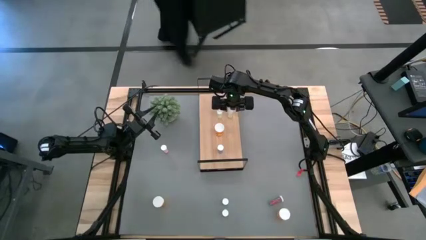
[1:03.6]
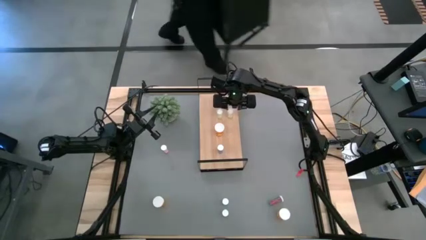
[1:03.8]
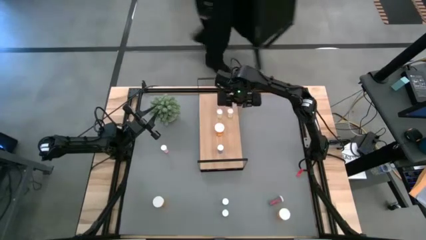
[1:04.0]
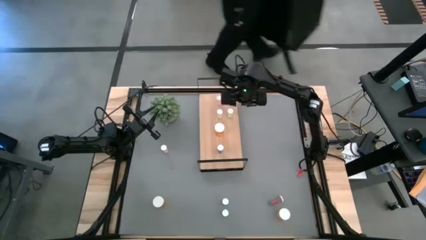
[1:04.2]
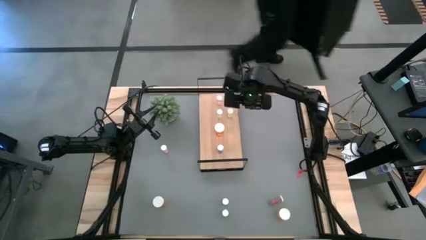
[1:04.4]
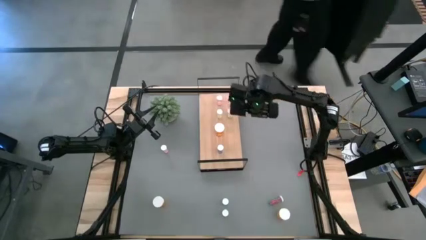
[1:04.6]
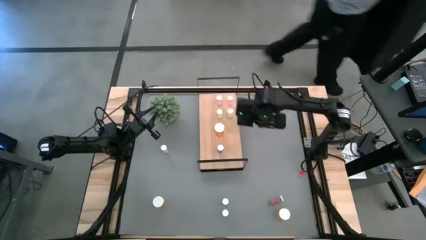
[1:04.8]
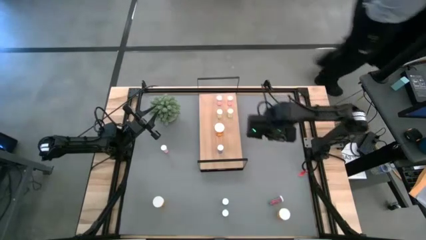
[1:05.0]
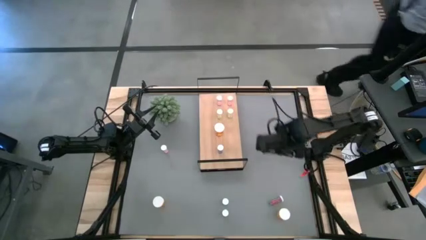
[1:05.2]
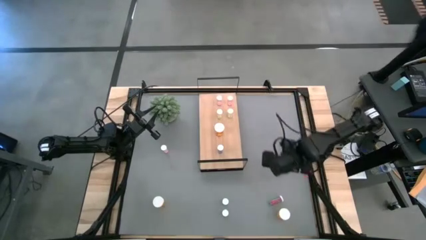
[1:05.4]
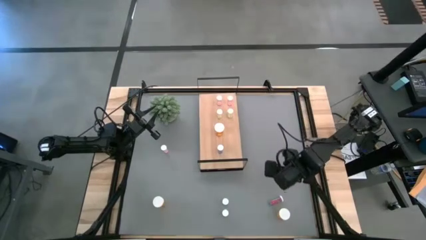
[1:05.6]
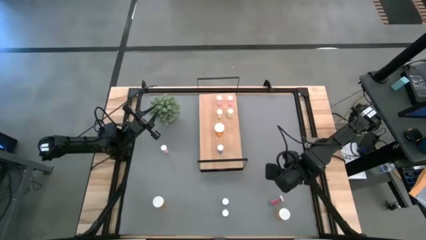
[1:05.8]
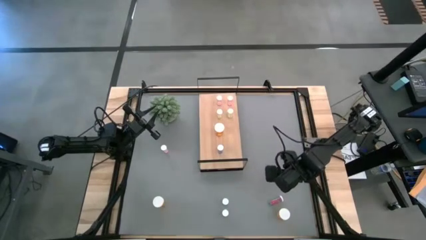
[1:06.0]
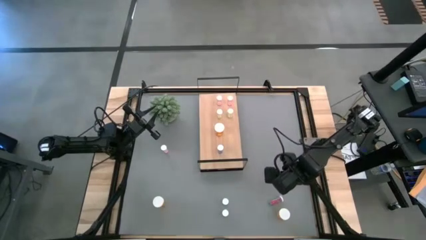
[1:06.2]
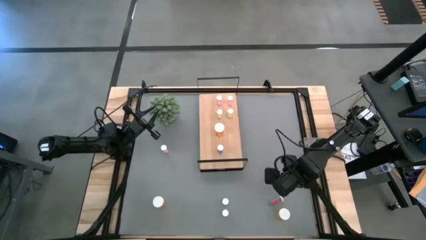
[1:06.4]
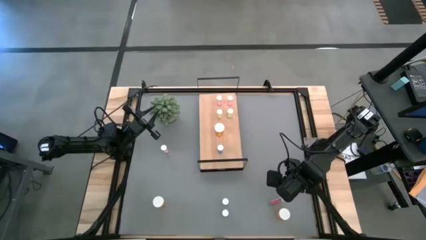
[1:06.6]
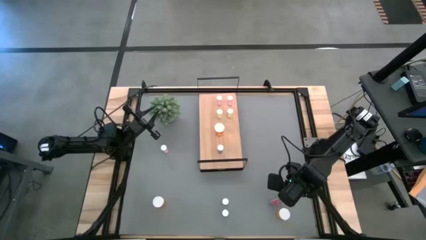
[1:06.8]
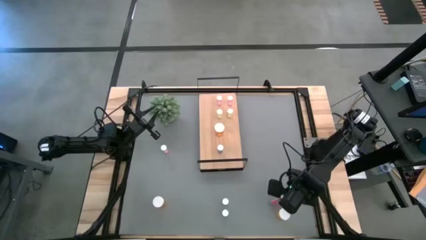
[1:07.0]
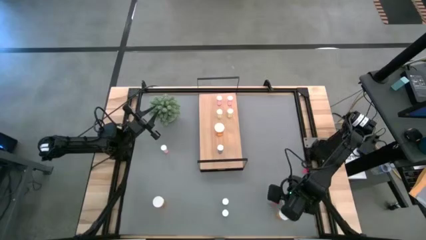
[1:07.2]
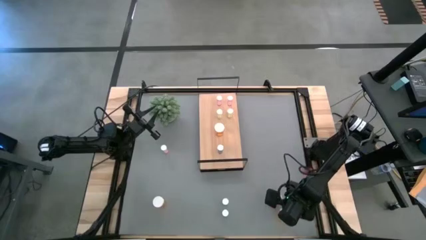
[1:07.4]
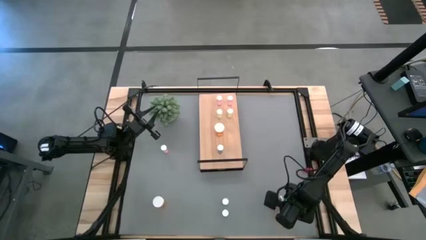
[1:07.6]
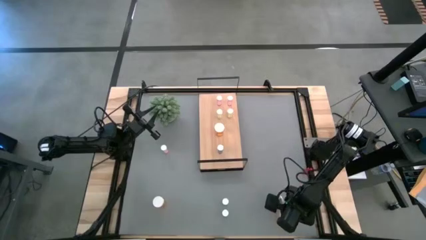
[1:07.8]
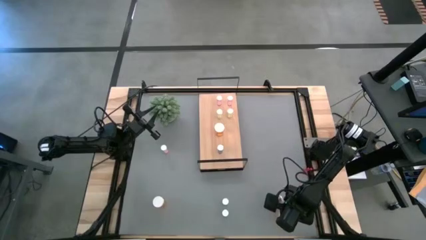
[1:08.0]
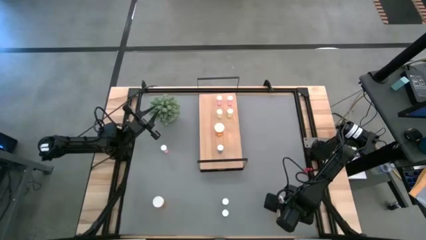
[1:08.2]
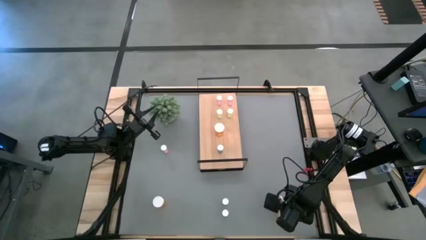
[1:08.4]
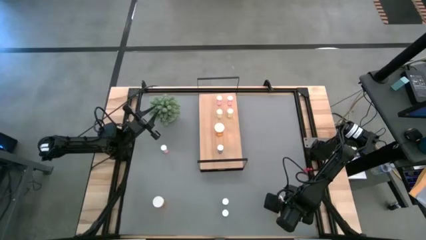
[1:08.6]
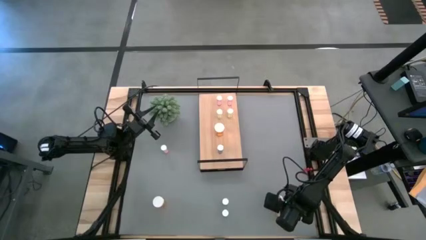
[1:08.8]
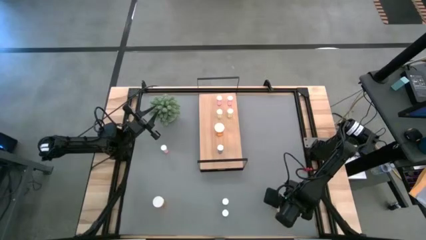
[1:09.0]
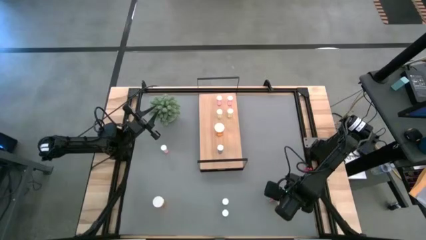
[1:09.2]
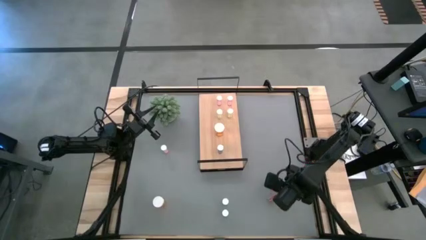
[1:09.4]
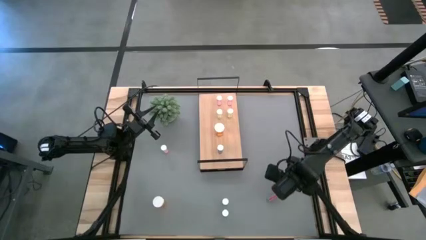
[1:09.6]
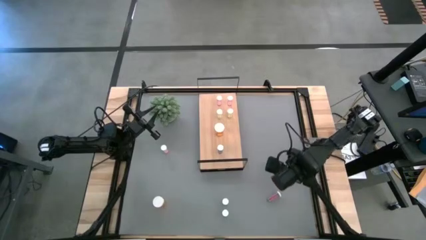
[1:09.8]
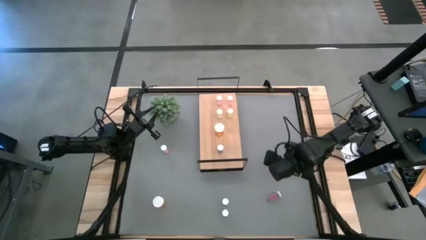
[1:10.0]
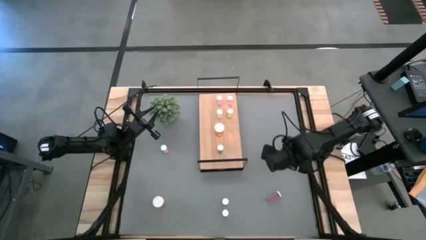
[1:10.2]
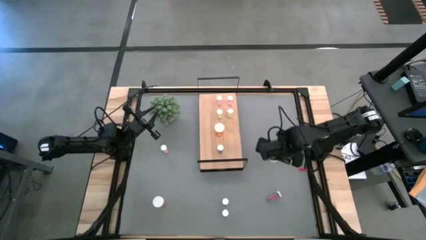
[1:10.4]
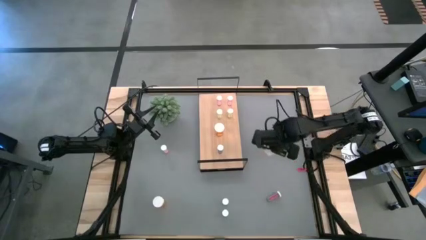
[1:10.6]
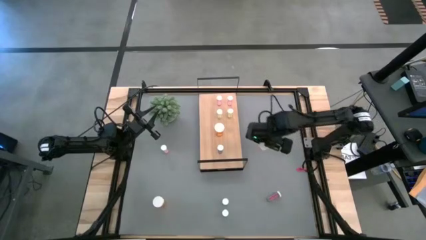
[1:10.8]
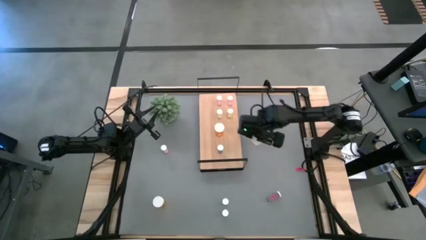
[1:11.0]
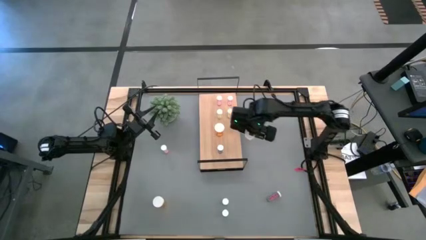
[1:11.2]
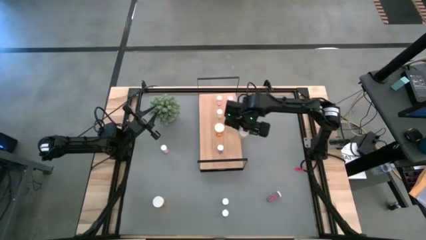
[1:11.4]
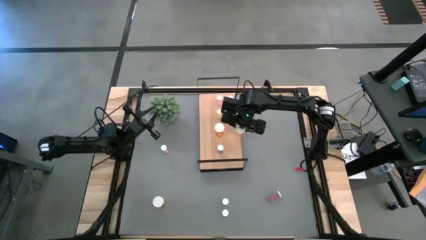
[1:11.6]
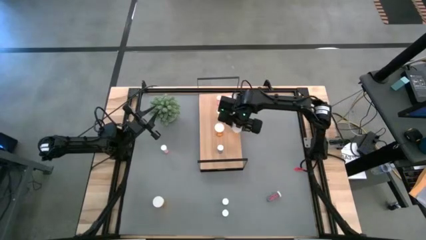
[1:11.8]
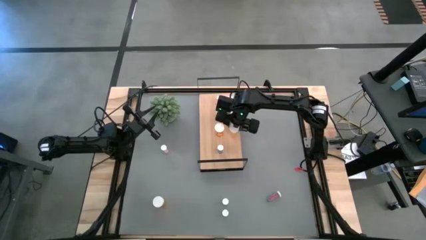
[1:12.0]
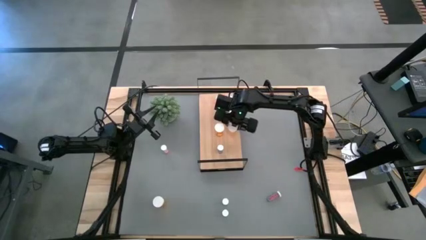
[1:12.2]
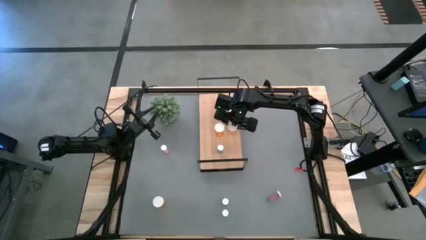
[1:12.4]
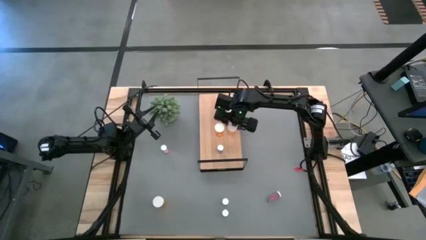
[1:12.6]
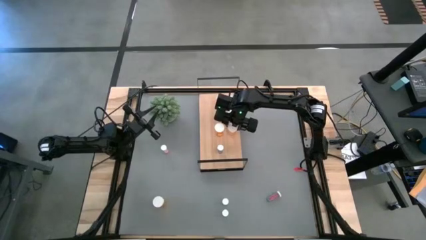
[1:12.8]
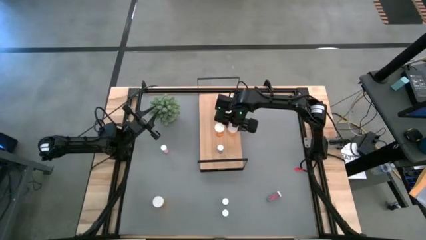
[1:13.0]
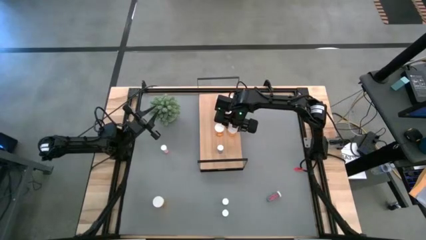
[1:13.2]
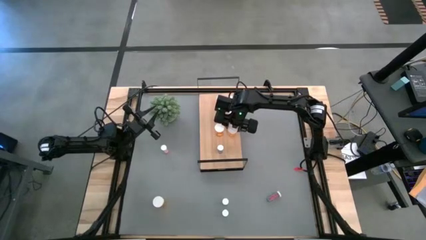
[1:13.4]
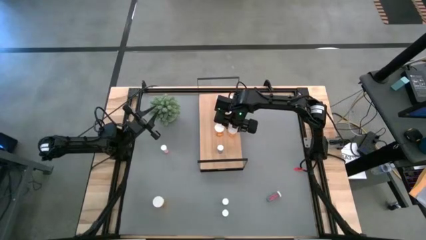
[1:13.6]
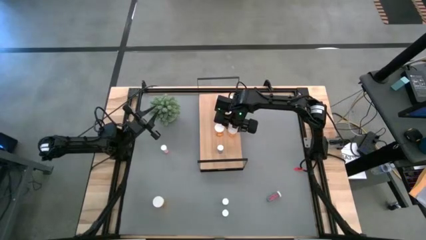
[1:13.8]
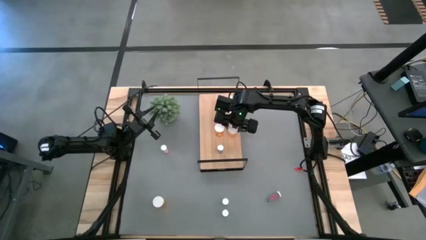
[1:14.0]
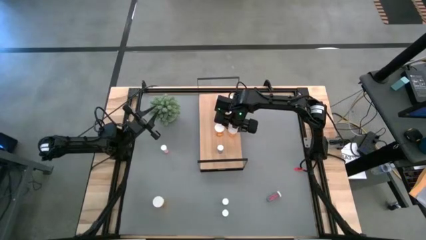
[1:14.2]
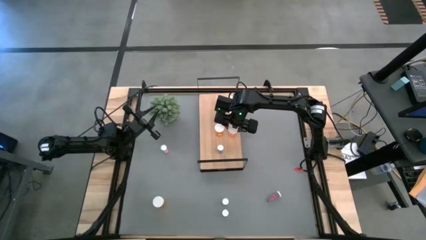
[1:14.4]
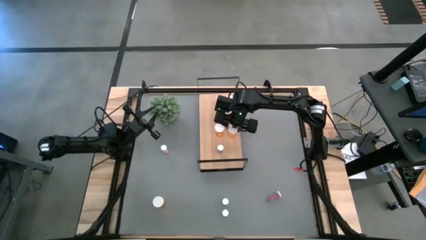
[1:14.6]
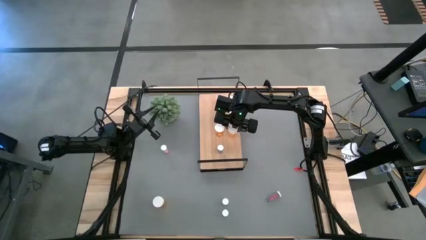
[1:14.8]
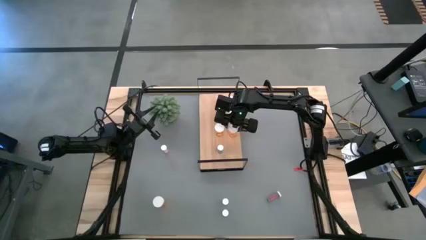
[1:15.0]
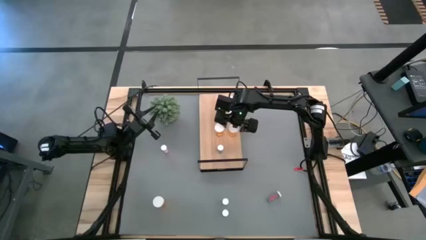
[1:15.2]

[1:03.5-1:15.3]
Task: Pick and place medicine bottles onto shelf by color
Put the right orange pill bottle aligned with the other orange pill bottle on the shelf

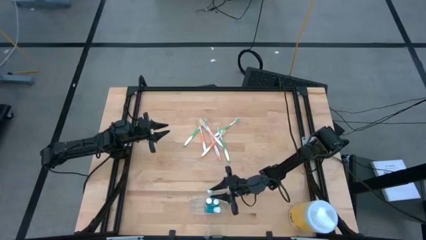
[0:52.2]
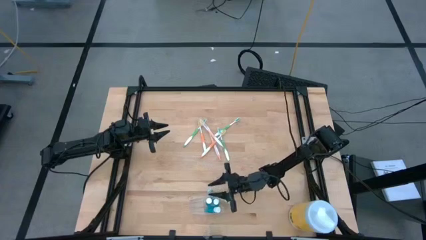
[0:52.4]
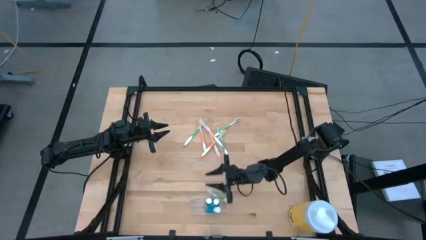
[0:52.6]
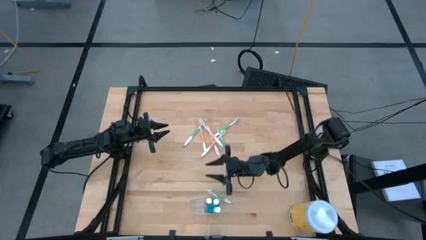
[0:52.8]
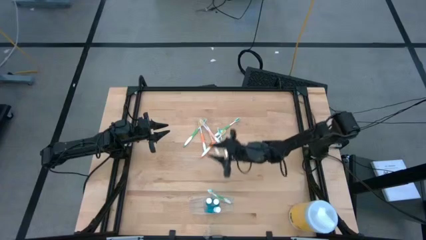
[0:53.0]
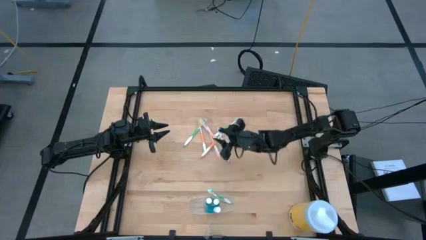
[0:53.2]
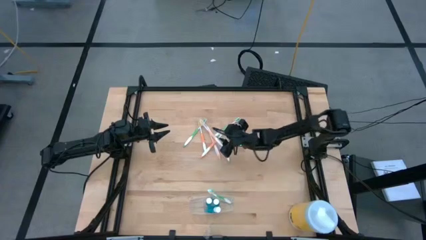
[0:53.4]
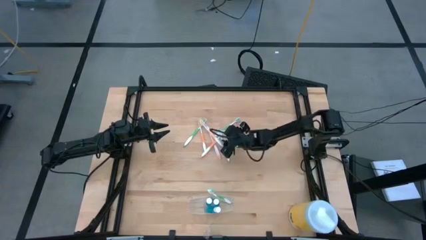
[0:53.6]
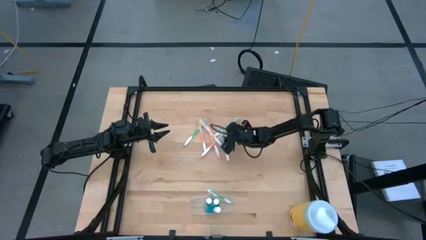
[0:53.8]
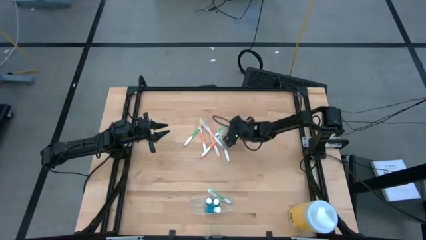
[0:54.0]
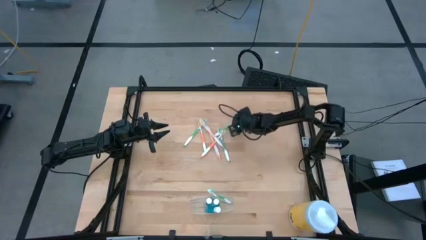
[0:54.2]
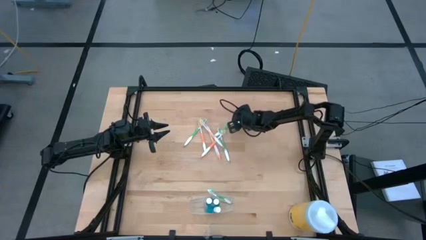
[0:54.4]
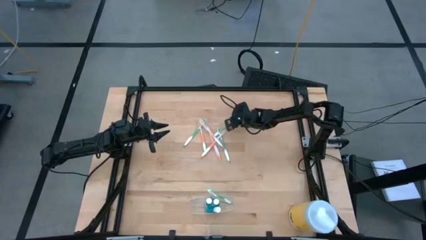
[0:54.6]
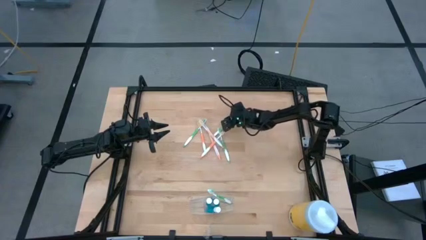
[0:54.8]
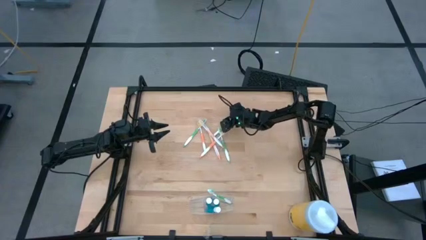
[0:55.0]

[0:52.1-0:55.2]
Task: Pick & Place toothbrushing station
Put the green toothbrush into the transparent organizer
